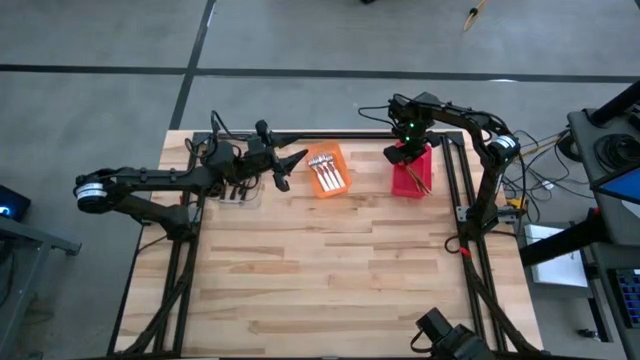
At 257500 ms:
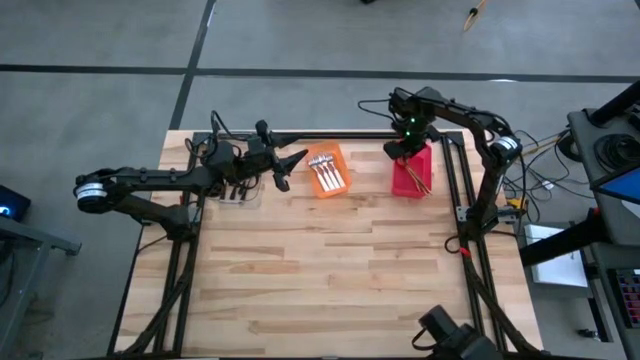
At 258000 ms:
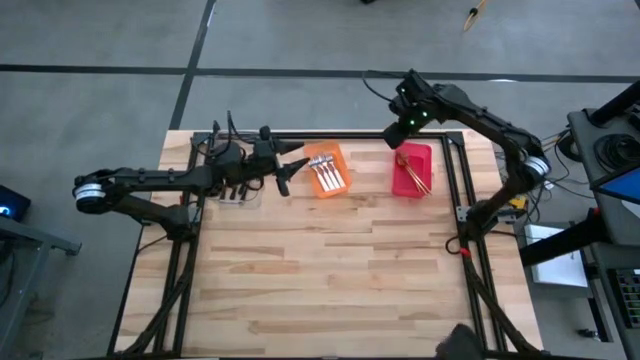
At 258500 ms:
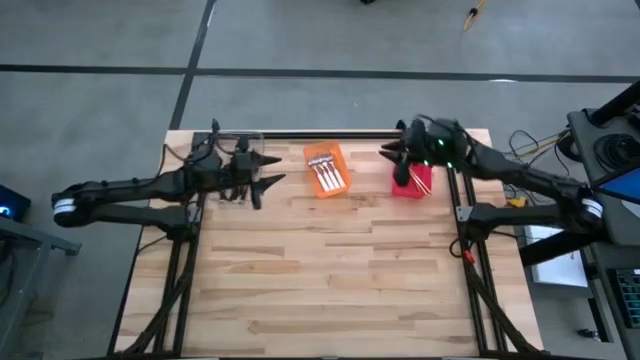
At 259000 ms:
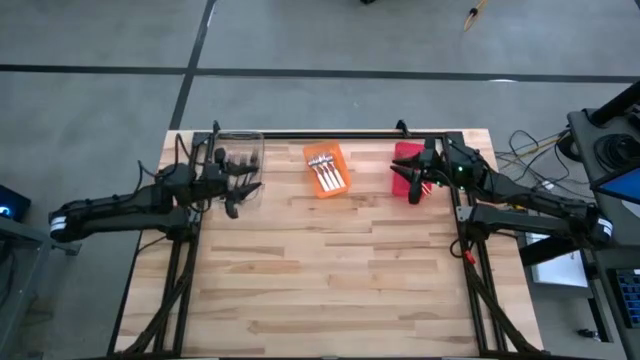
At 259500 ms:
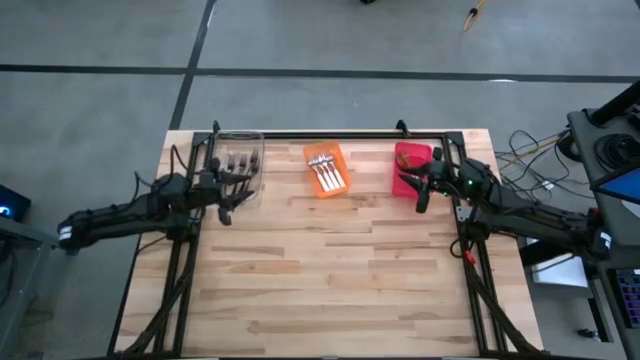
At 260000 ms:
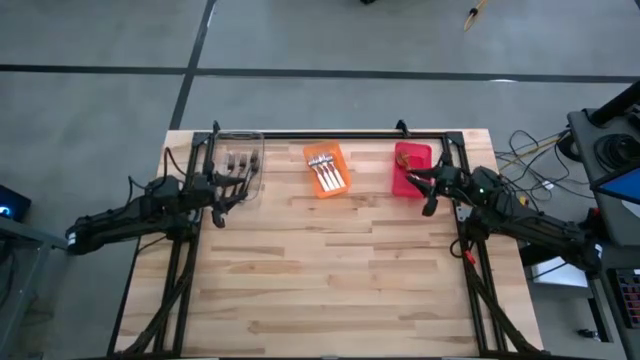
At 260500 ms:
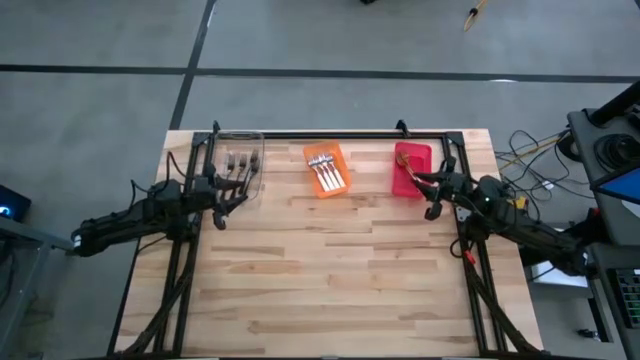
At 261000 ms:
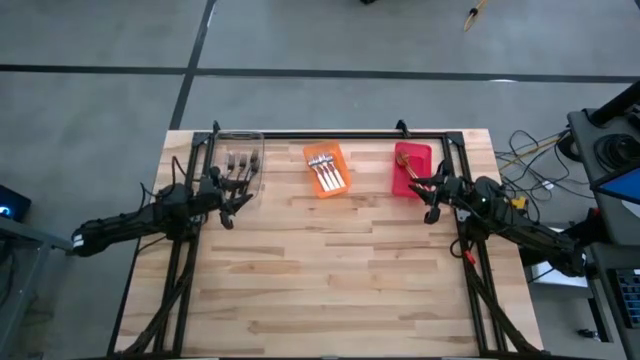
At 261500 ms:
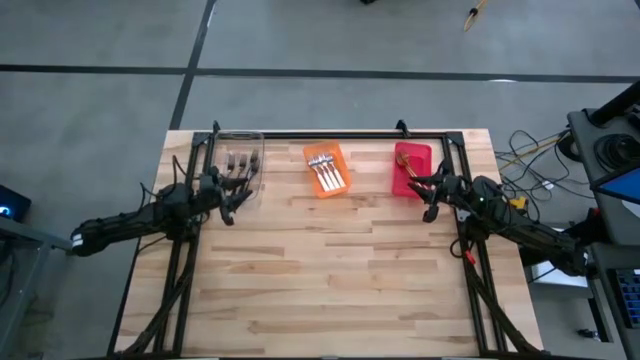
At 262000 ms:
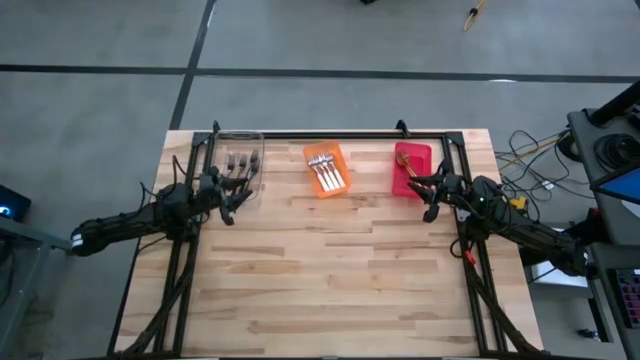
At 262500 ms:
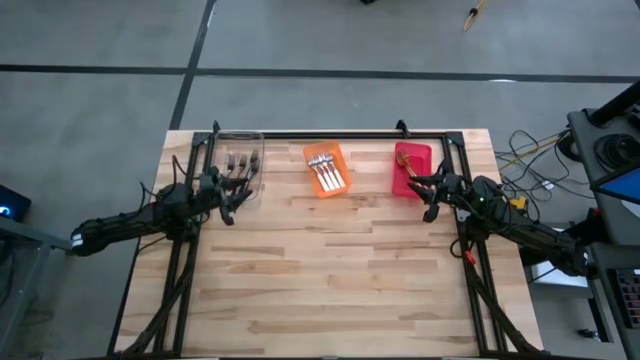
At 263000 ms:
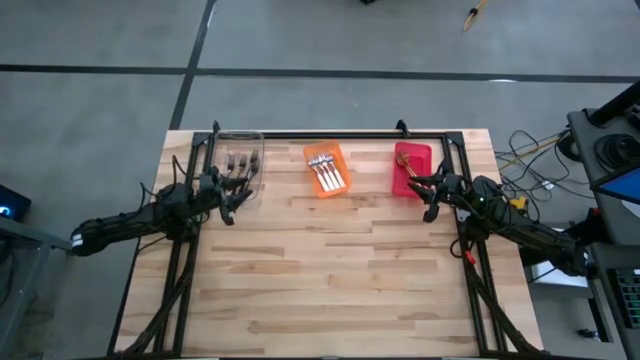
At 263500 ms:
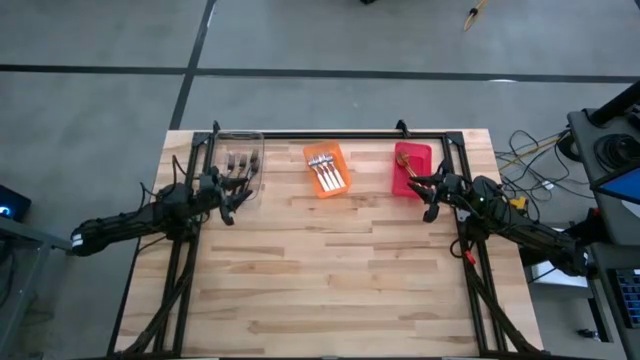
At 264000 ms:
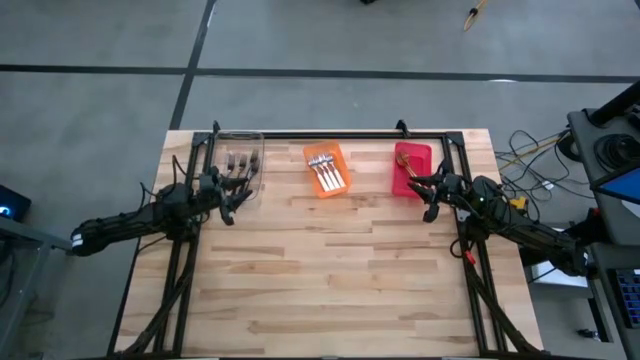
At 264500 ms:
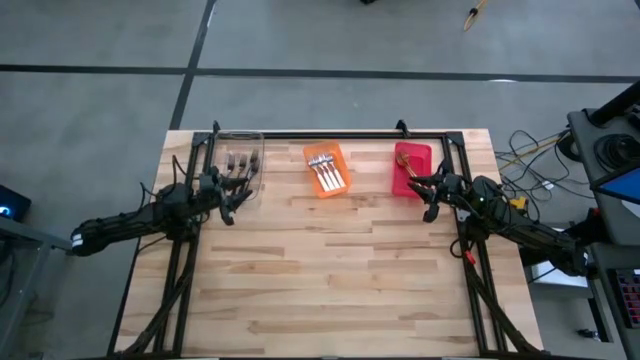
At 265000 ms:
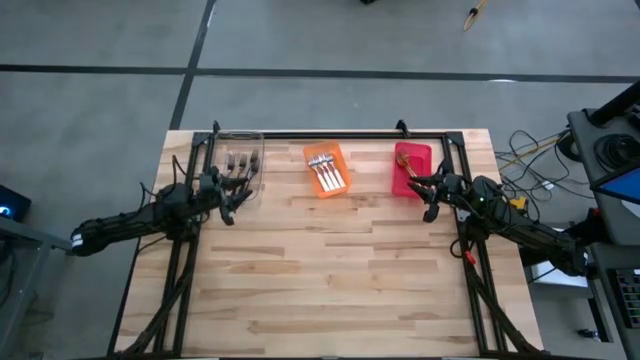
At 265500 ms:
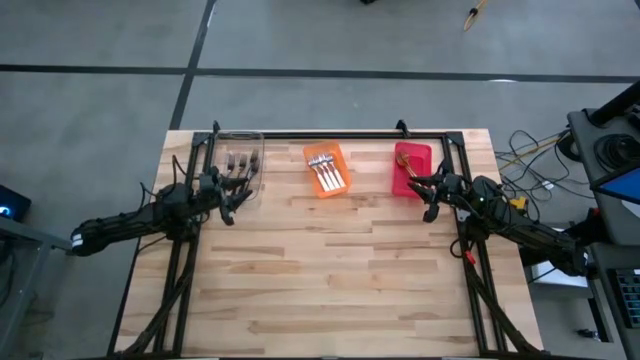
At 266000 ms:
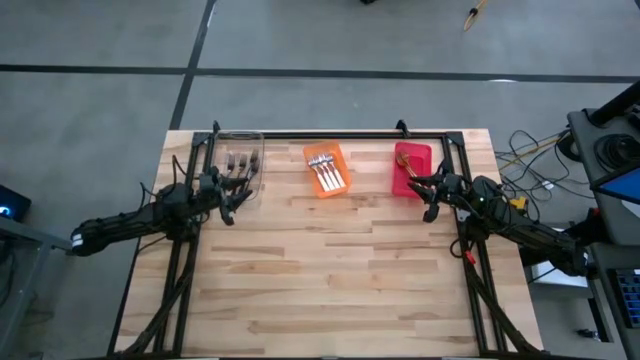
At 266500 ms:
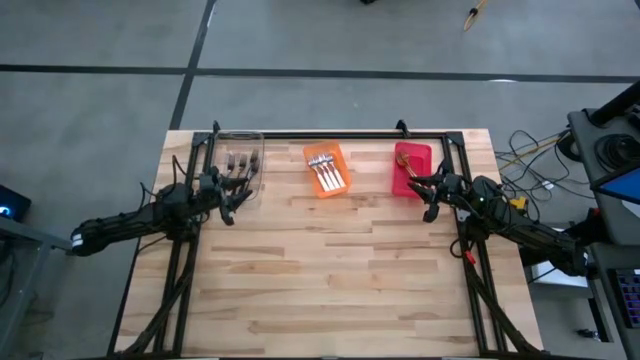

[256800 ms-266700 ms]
Task: Sort silverware by color (type)
Return to Home Position

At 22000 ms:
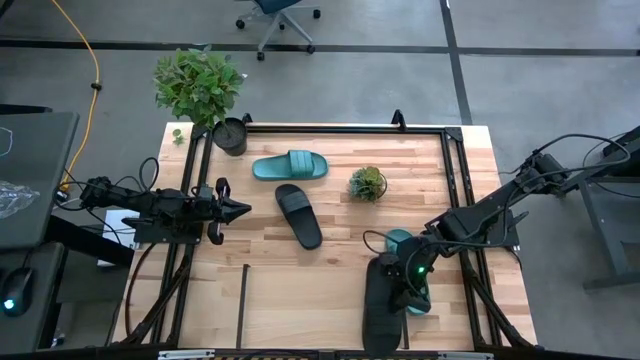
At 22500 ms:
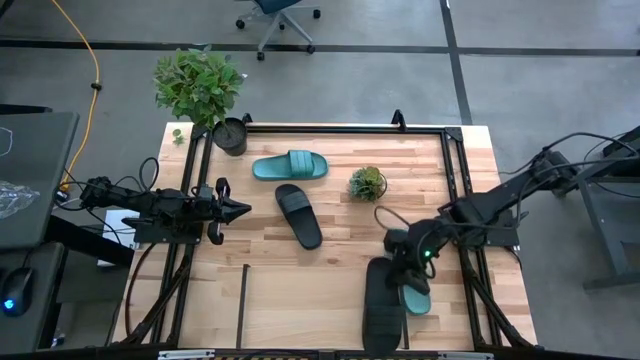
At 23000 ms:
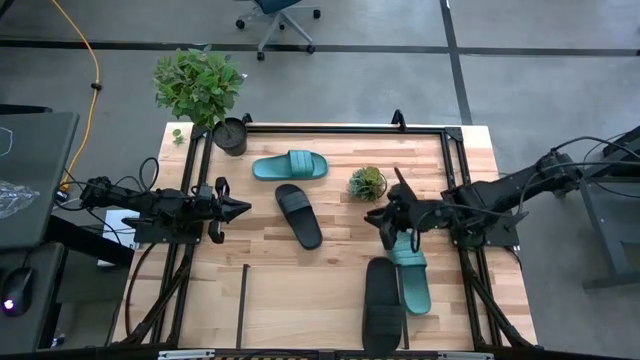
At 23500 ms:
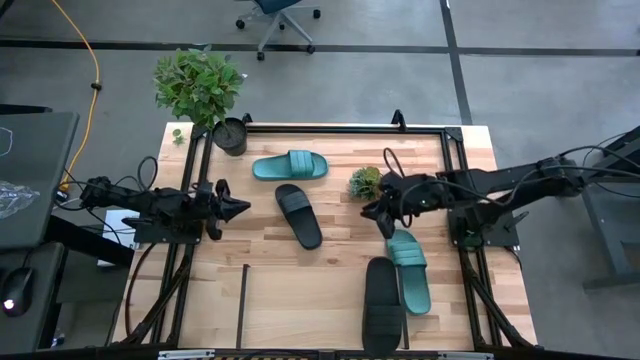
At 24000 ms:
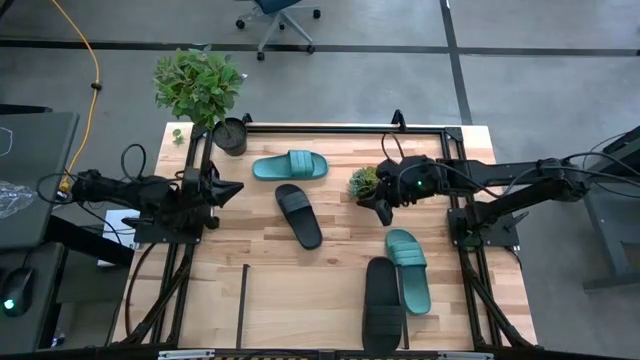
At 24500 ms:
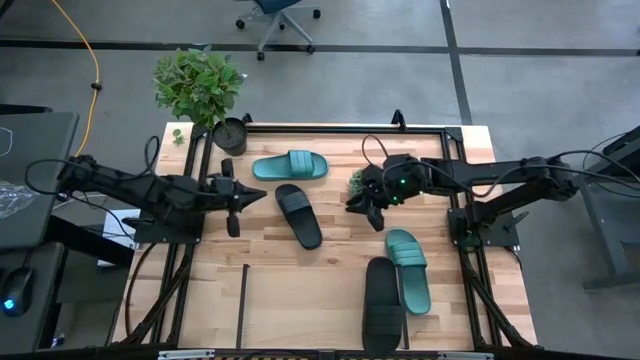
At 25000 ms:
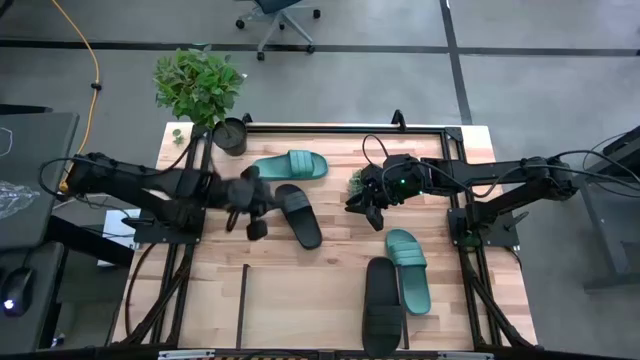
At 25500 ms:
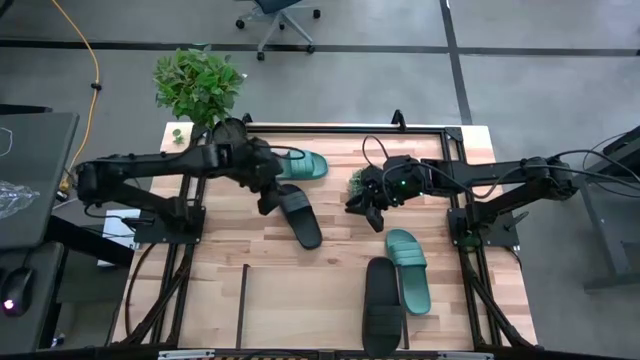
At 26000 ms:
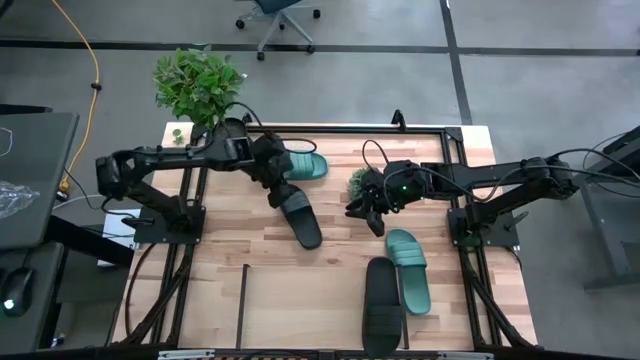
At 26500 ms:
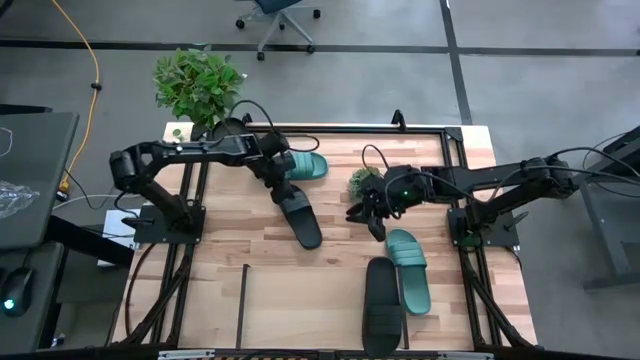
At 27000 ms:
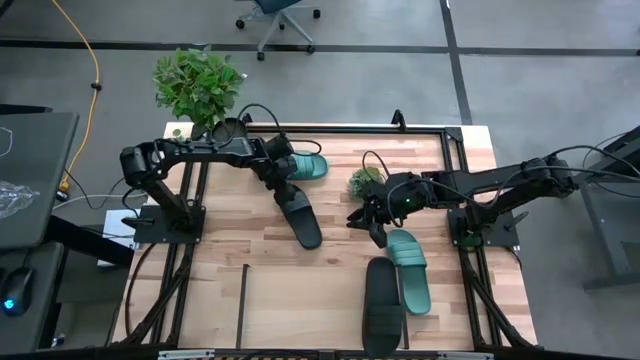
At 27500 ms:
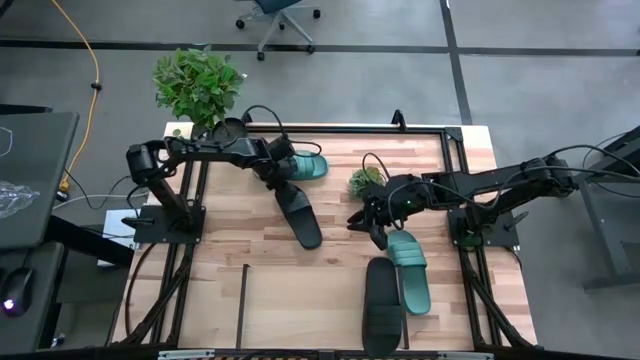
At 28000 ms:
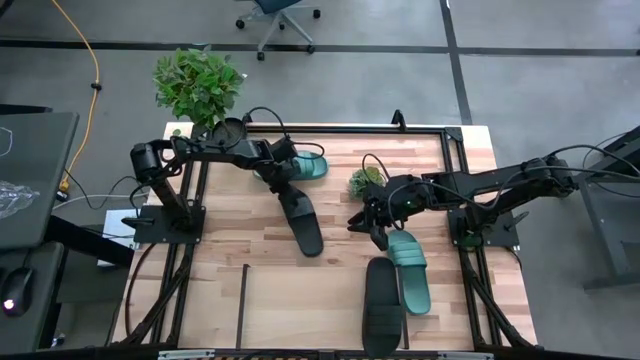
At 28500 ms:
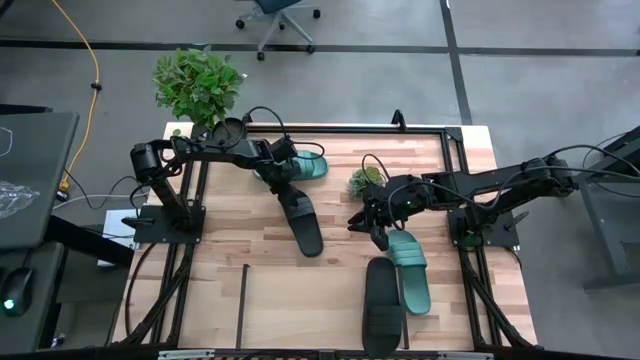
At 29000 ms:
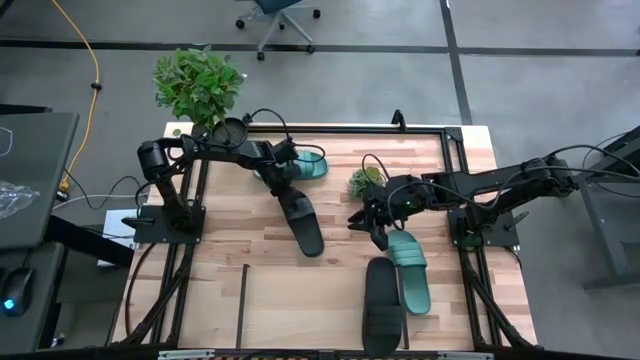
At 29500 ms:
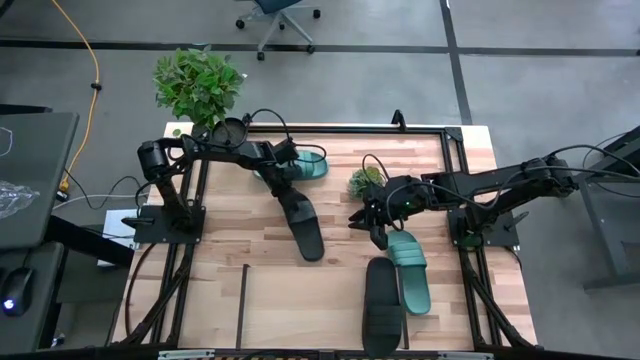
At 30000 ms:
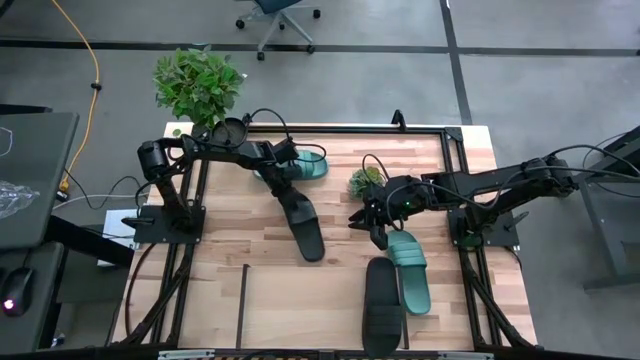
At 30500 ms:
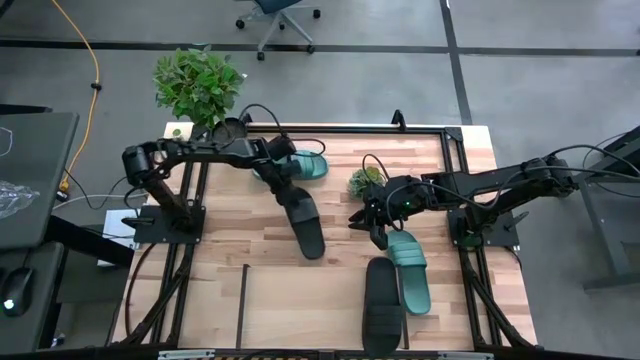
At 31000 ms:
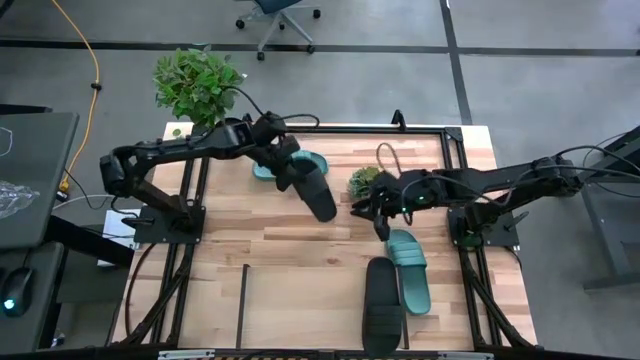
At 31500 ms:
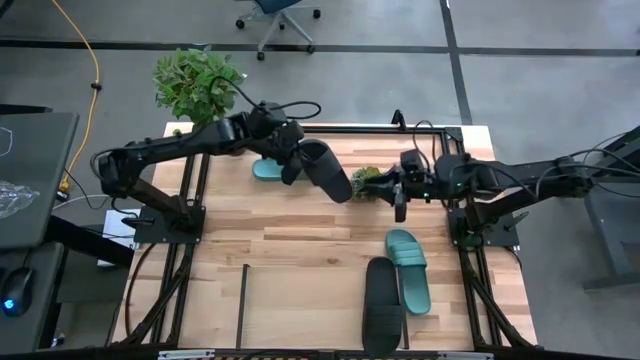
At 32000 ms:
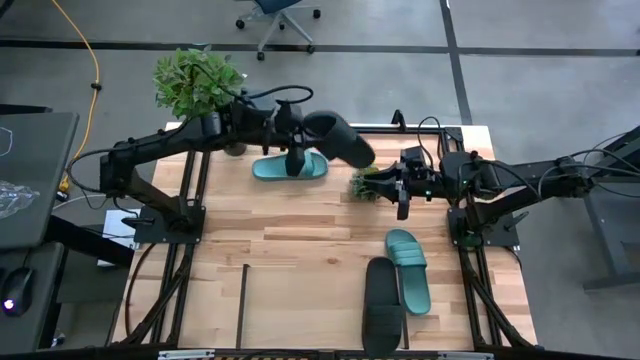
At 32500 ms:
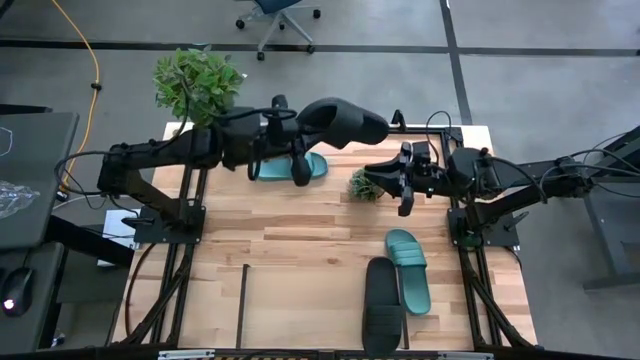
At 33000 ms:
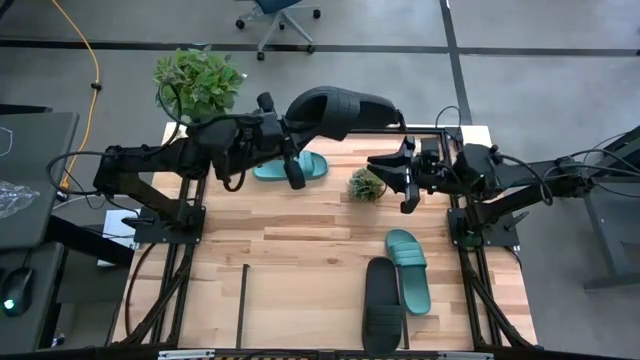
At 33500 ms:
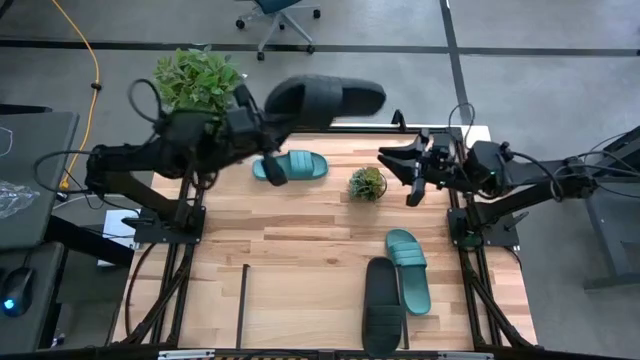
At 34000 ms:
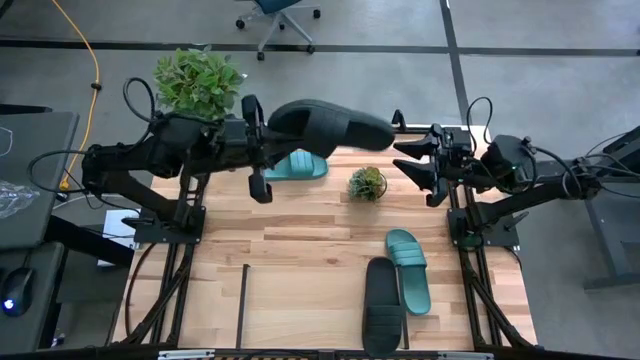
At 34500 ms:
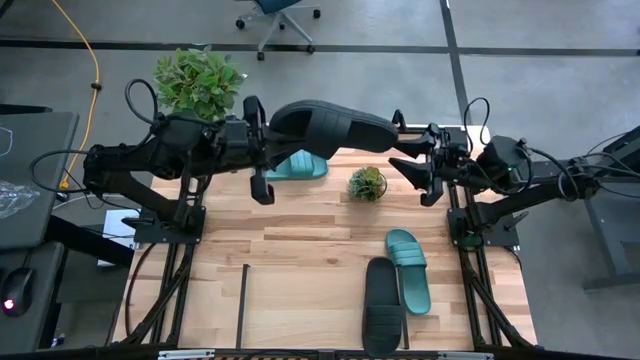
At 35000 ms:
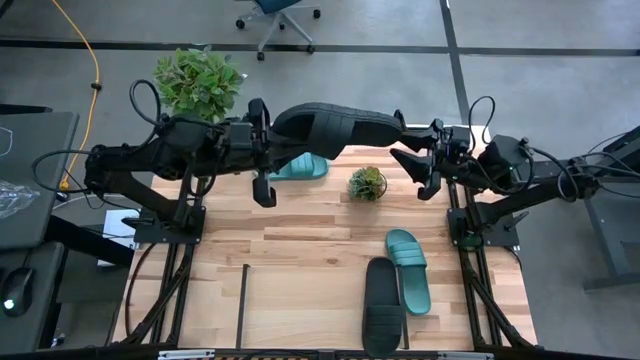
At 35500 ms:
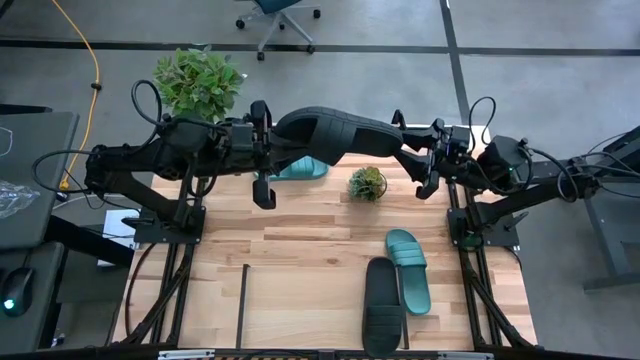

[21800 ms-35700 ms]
Task: Pick and place slides into the shelf
Put the black slide on the shelf
